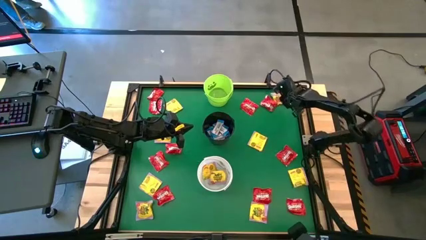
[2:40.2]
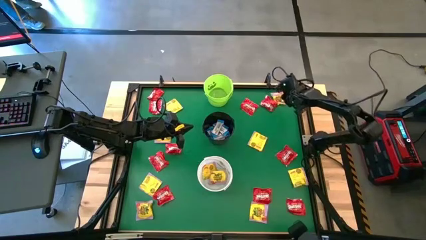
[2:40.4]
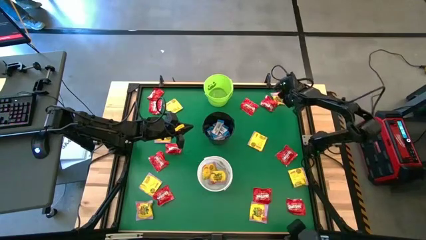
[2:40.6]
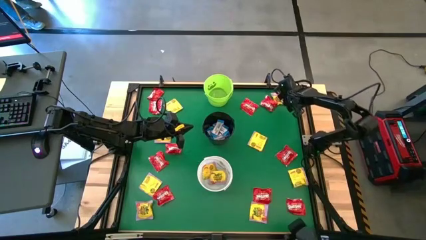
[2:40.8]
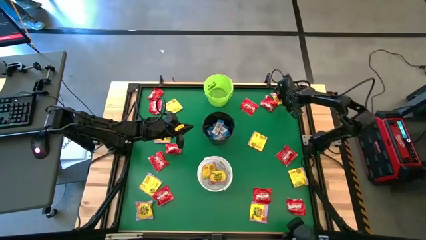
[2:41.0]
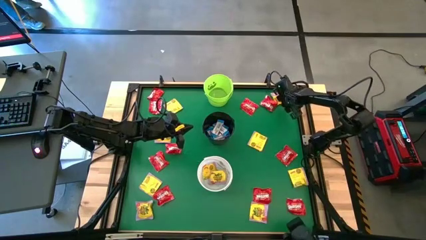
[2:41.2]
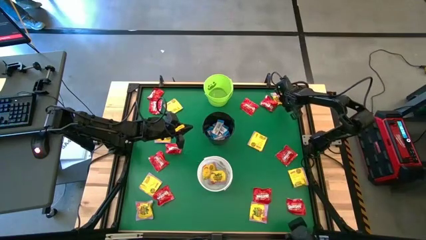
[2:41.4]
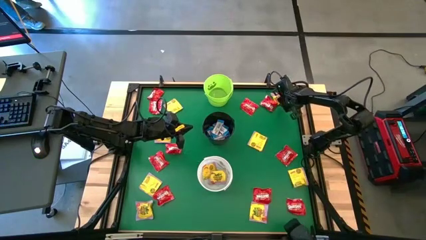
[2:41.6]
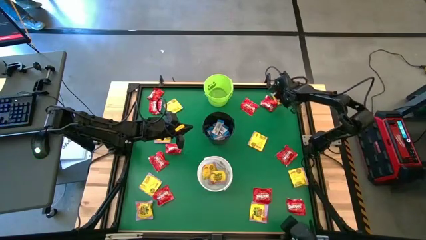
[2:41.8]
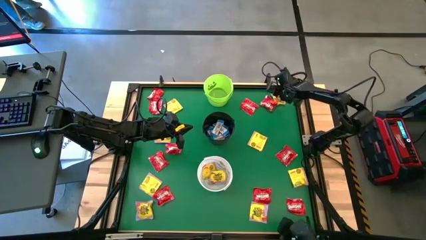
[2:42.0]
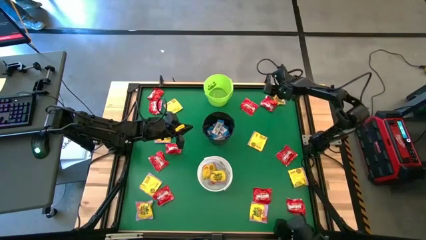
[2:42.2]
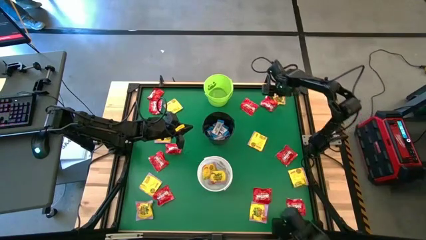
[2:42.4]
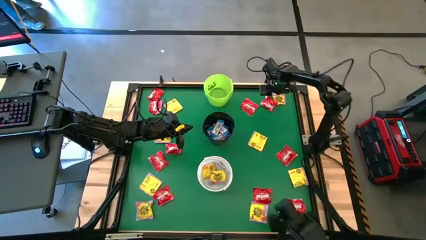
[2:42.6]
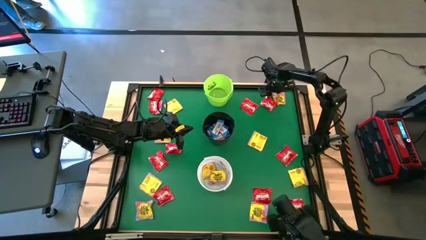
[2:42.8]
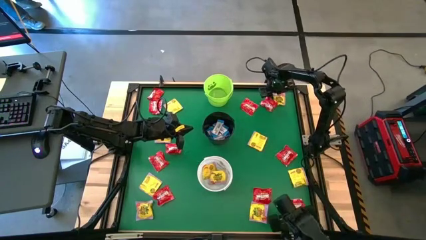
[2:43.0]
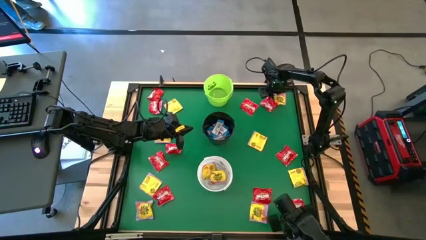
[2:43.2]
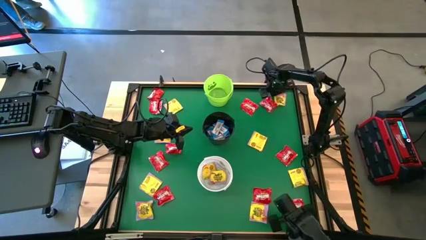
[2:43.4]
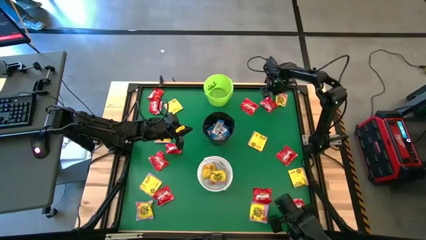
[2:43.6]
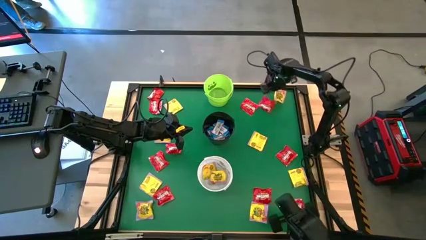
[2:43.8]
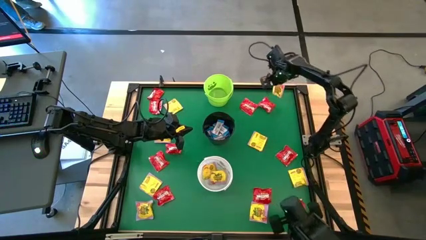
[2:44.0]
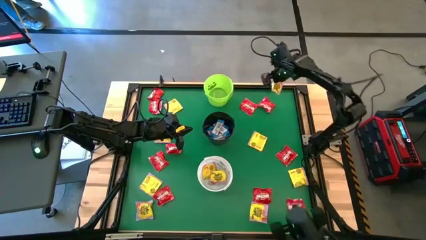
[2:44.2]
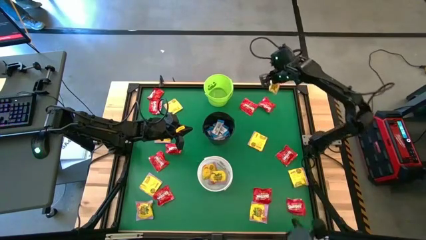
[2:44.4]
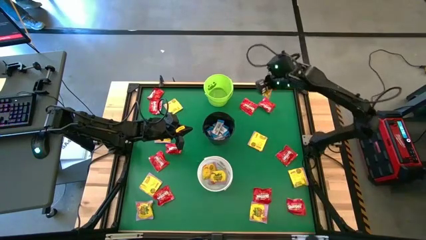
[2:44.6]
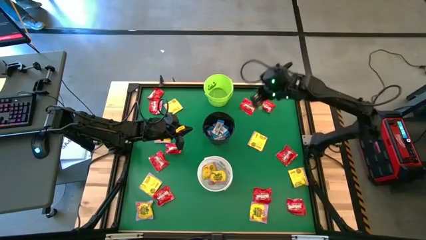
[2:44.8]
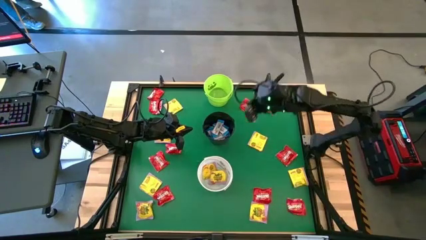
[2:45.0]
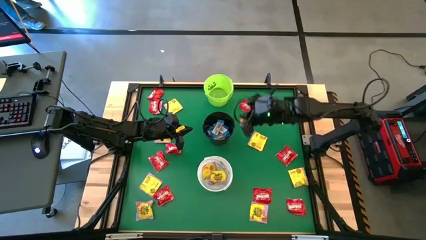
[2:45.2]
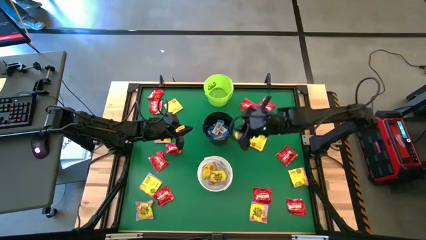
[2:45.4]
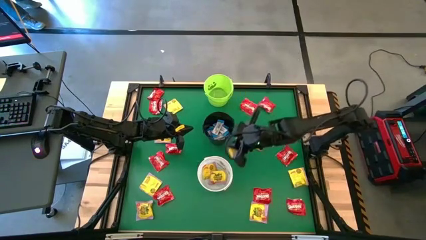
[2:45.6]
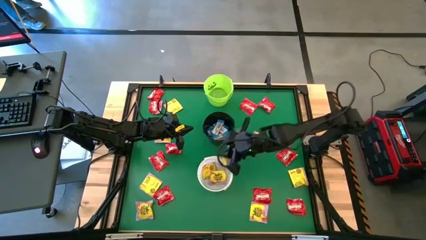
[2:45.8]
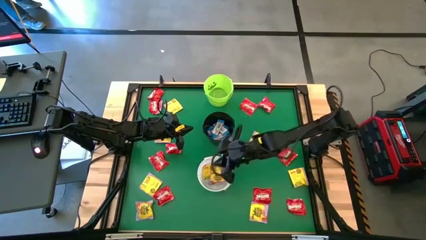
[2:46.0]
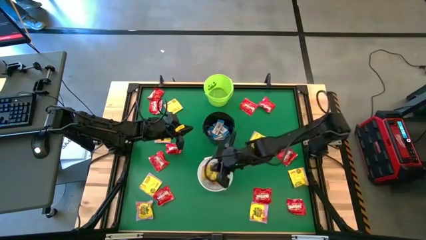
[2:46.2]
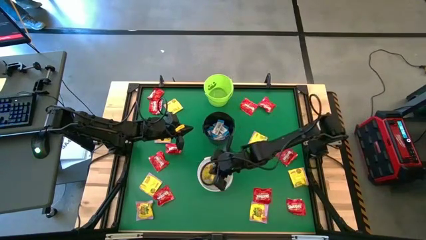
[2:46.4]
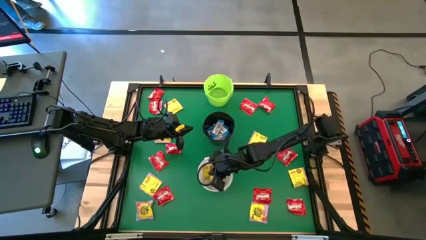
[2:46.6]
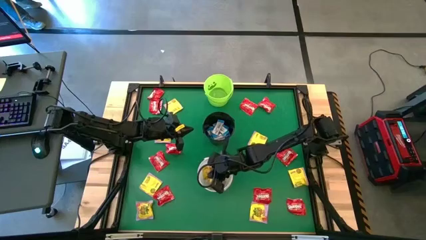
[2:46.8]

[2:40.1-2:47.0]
Task: Sort candy by brand, put in halloween buckets
Put the yellow candy into the white bucket

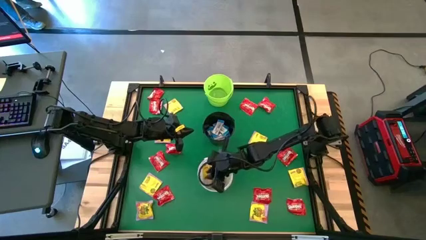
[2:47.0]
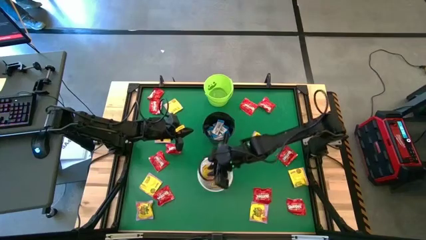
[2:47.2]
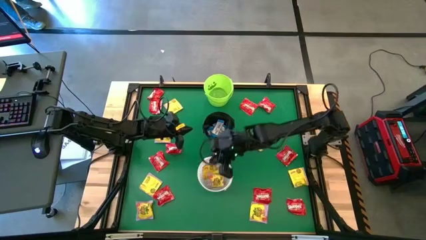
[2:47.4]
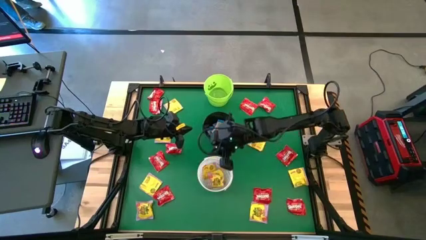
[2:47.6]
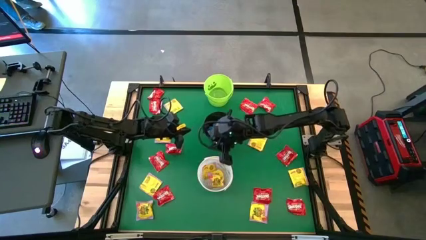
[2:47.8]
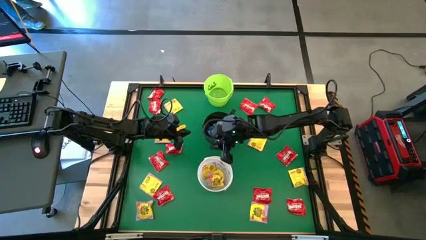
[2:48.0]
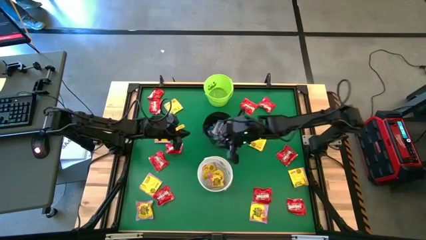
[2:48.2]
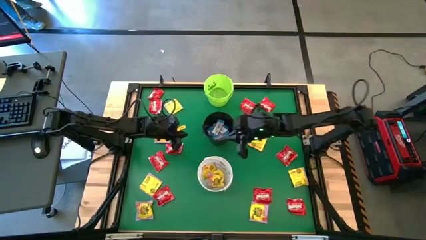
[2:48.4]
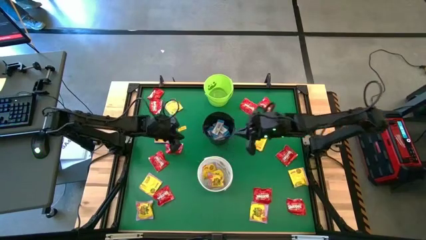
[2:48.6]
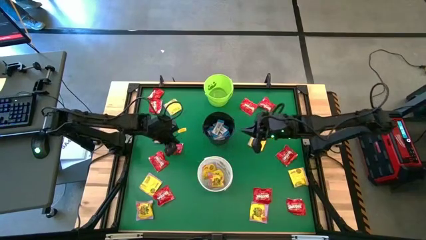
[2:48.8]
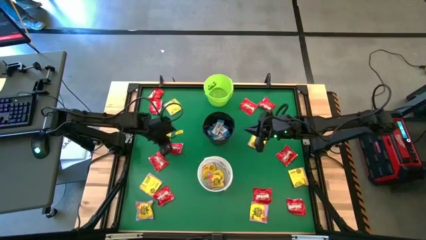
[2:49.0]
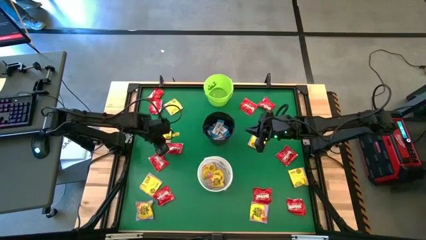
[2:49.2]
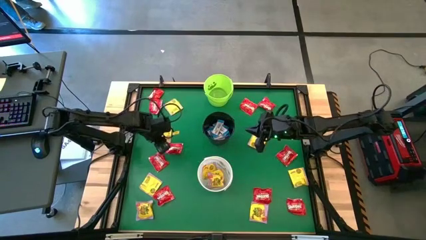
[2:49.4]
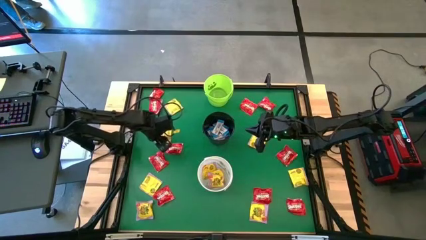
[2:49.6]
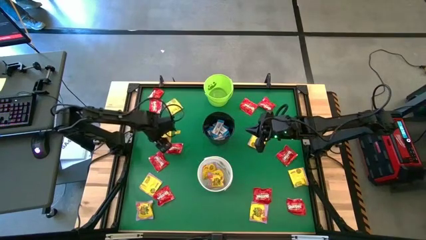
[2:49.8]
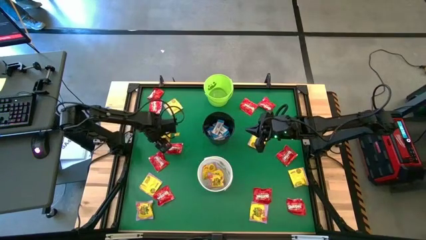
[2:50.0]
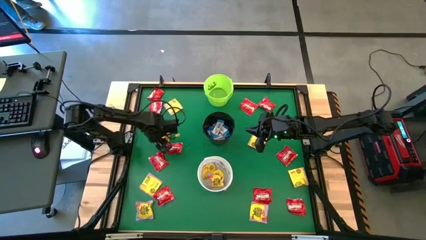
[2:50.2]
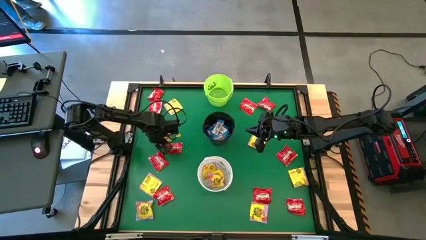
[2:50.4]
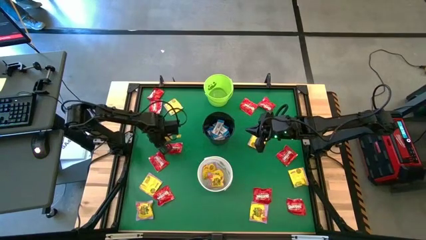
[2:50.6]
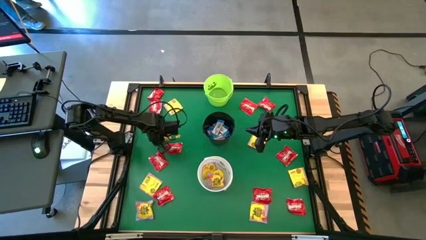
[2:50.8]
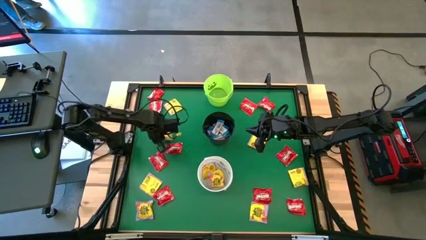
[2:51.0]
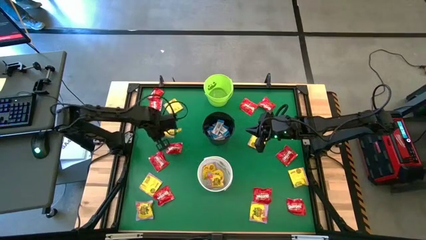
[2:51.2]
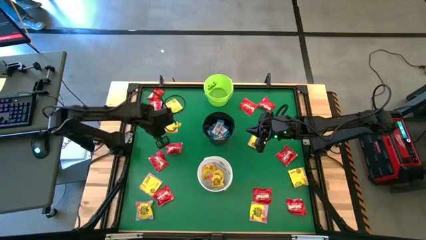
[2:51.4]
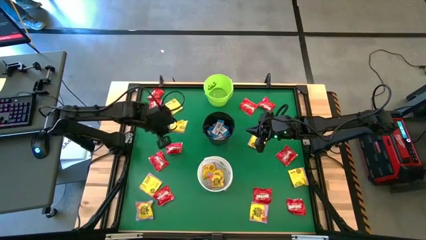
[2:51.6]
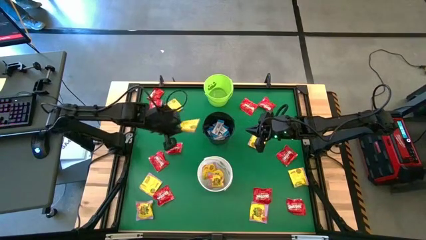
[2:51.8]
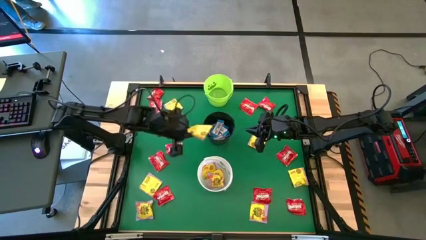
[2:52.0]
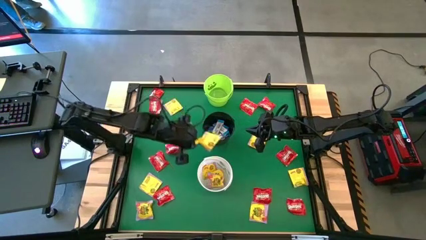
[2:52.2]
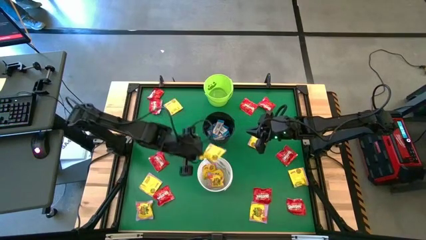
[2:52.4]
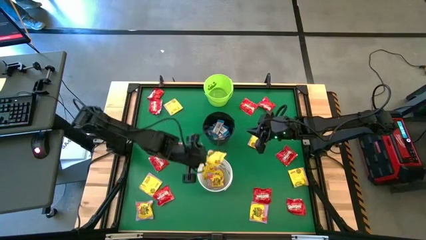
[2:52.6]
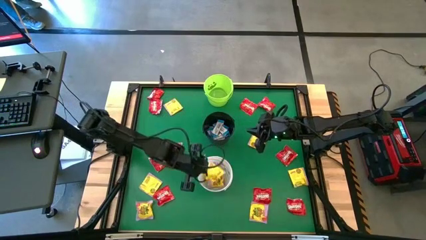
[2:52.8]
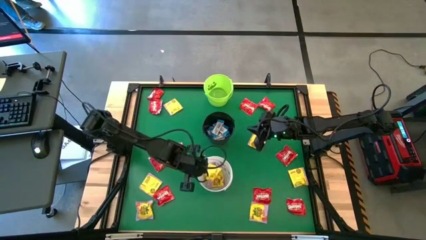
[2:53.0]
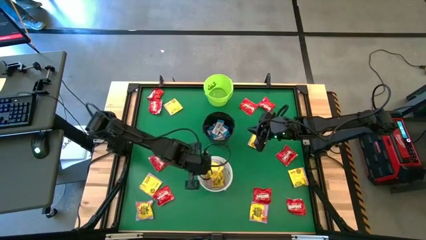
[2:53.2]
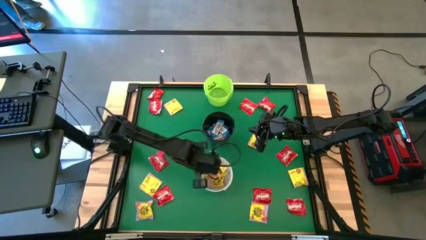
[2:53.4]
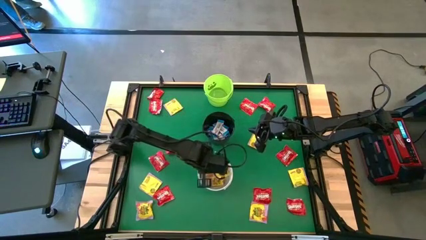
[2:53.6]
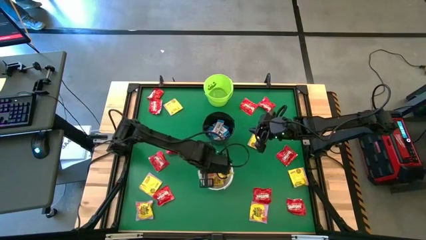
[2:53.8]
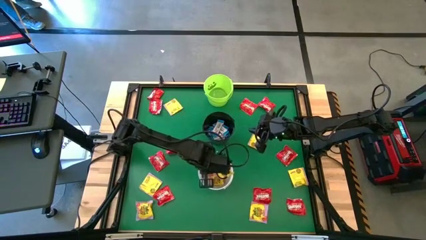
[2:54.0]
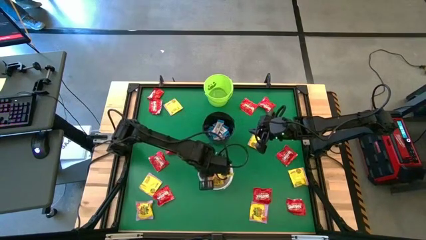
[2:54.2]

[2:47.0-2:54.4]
Put the yellow candy into the white bucket

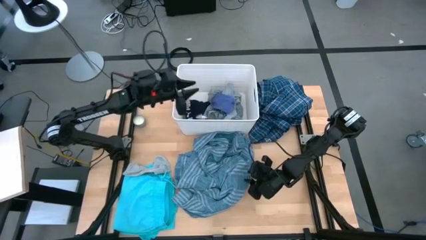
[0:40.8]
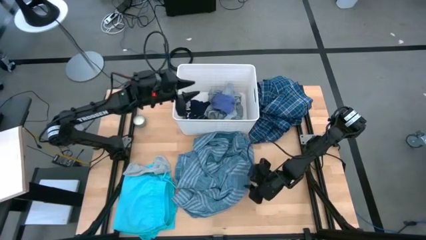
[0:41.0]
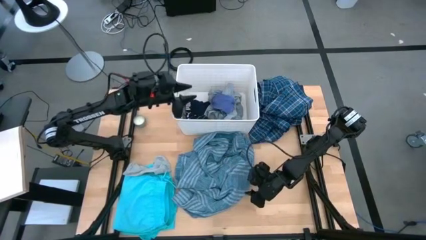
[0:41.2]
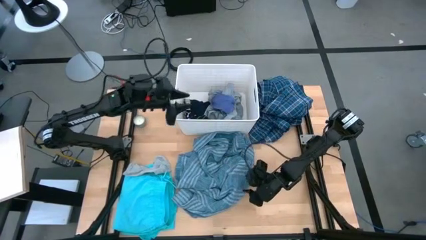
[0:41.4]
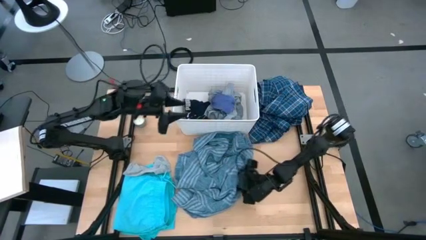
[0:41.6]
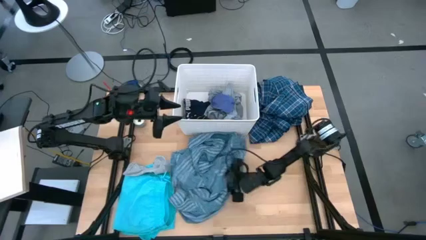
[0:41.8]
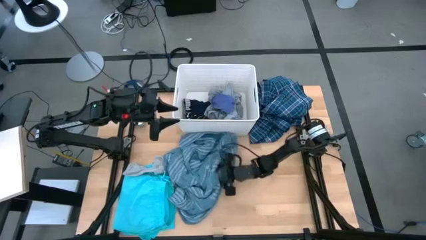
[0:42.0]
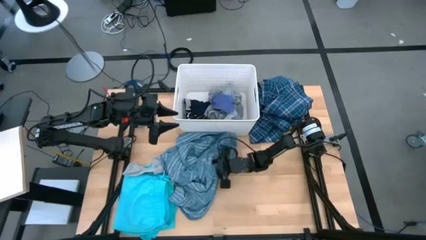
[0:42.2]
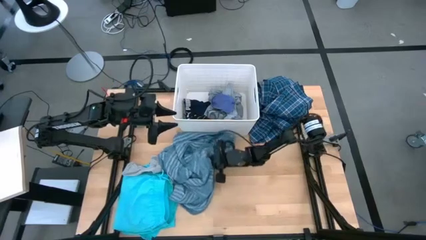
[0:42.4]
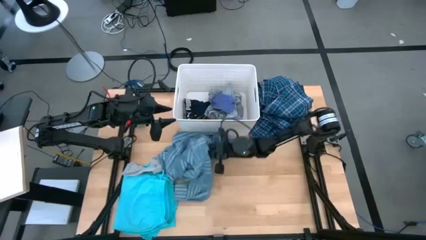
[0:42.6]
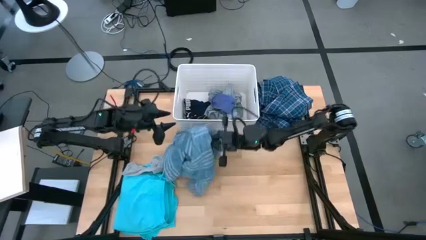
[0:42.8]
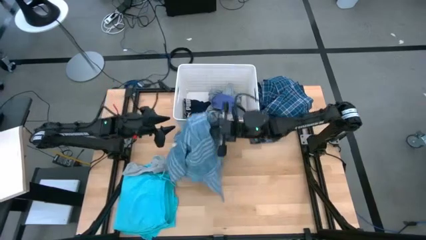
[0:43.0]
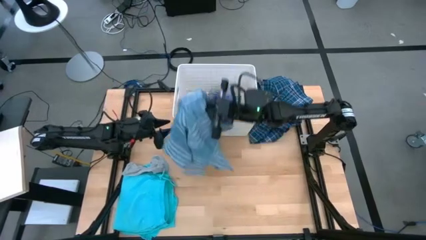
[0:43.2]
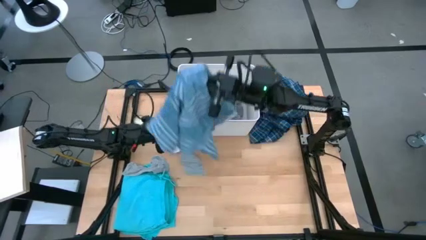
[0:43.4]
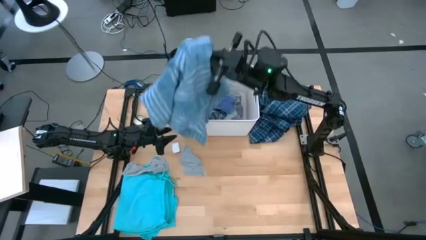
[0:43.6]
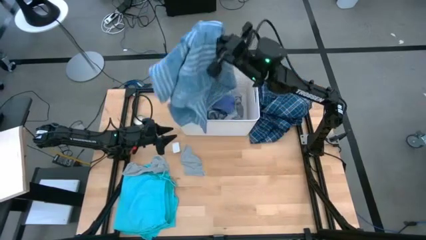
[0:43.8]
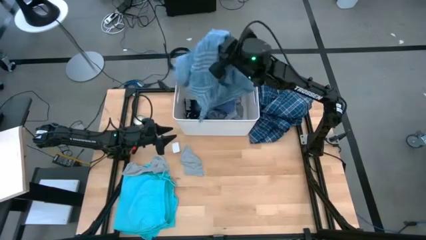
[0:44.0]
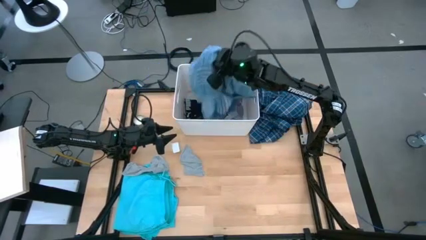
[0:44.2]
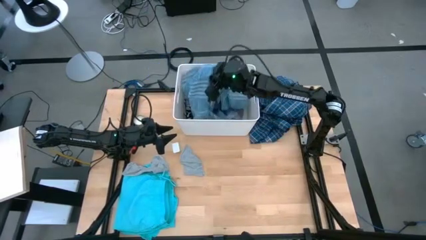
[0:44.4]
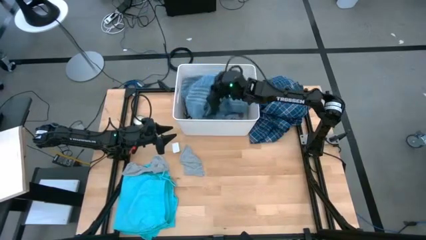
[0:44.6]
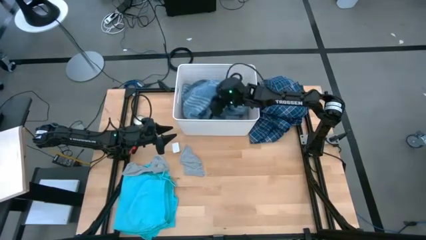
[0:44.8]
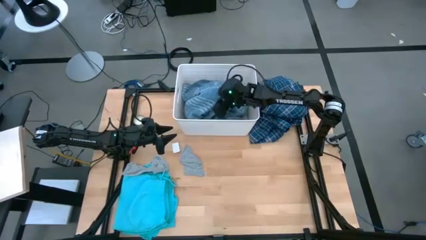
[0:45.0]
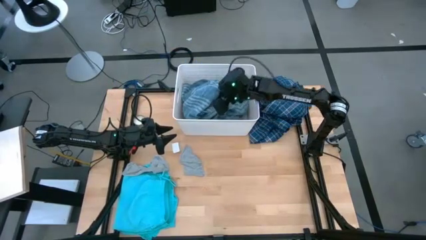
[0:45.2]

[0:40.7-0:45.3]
Task: Sort clothes
Put the light blue shirt into the white laundry bin
